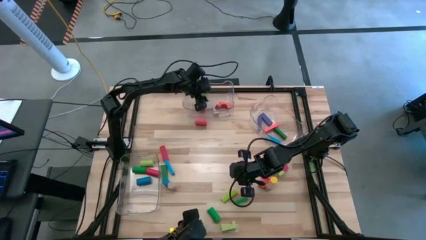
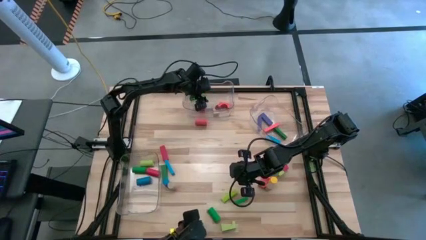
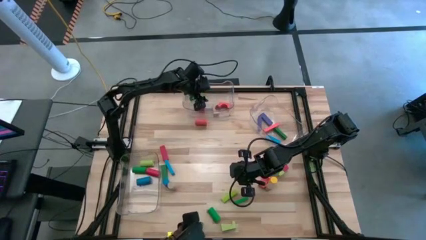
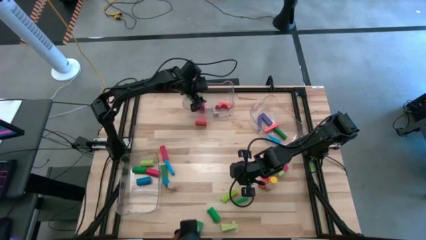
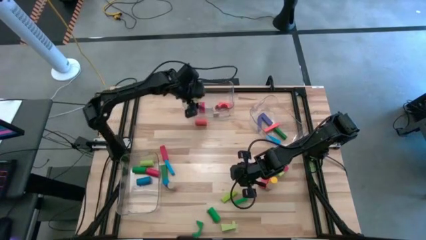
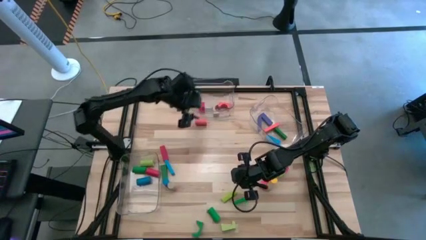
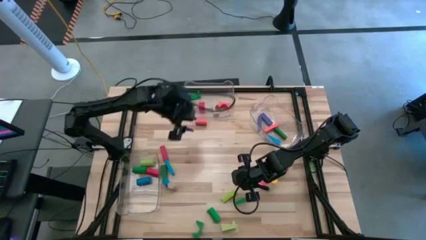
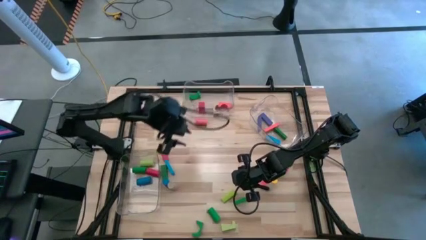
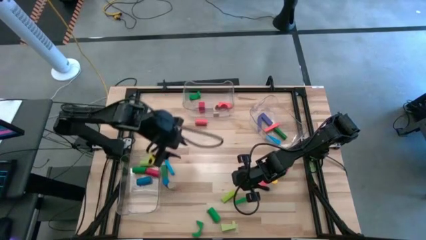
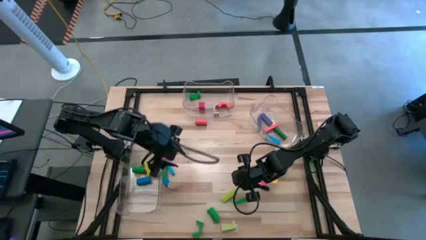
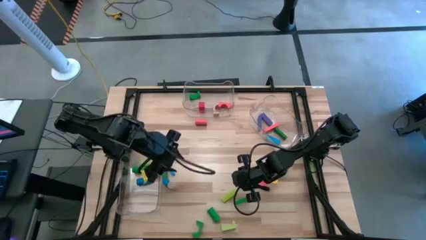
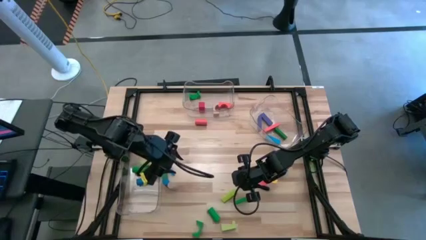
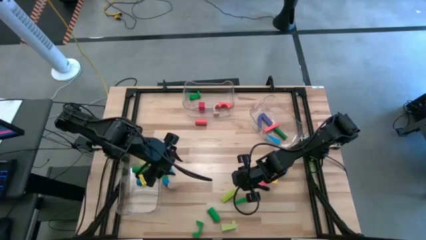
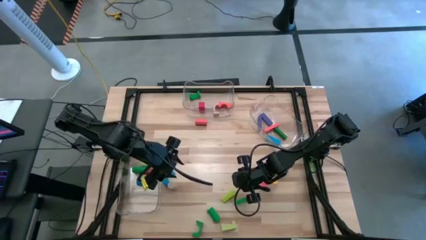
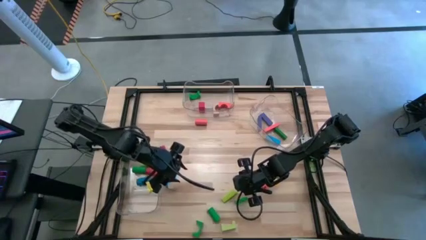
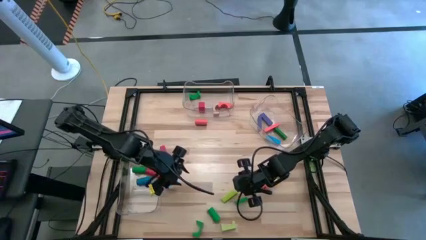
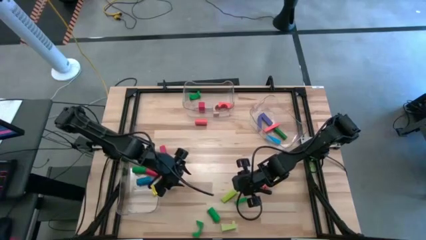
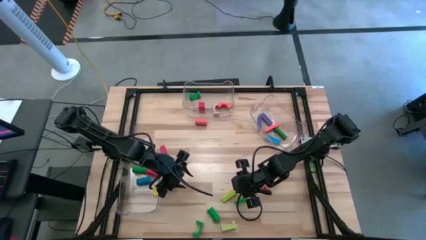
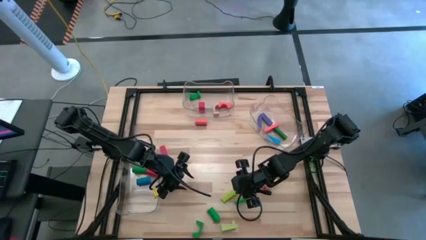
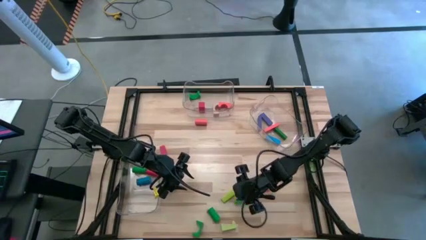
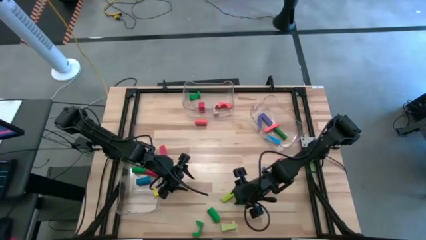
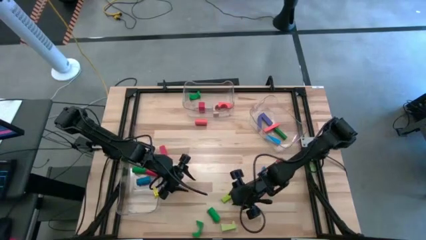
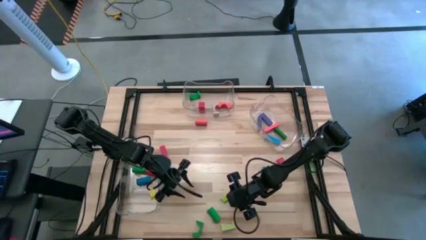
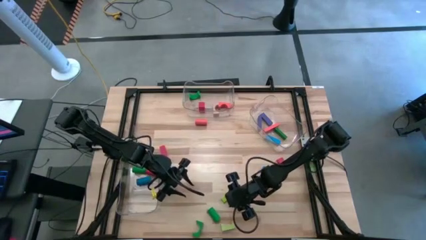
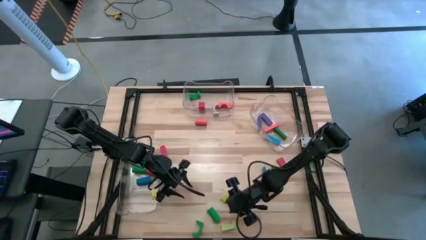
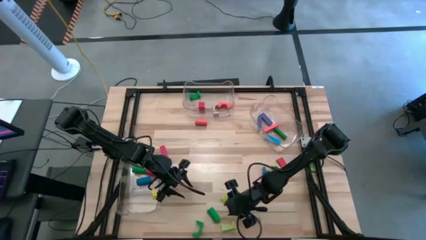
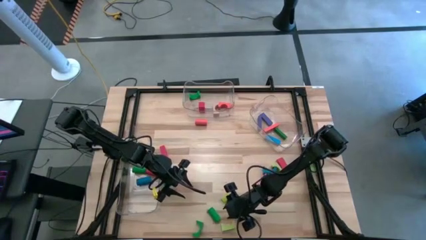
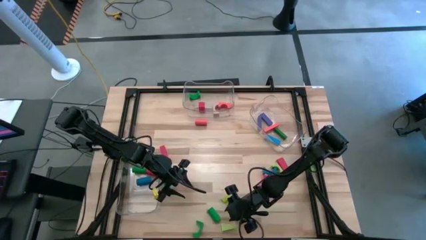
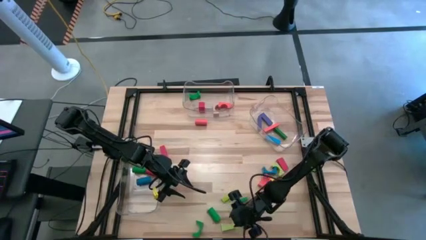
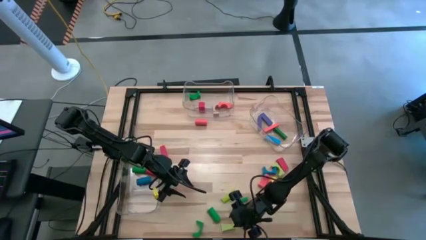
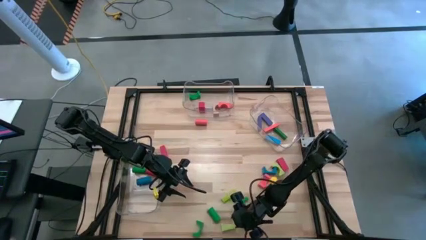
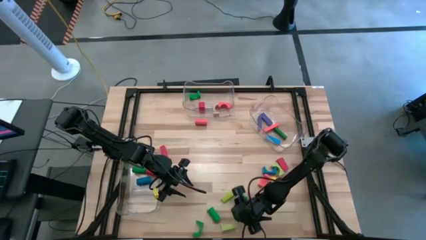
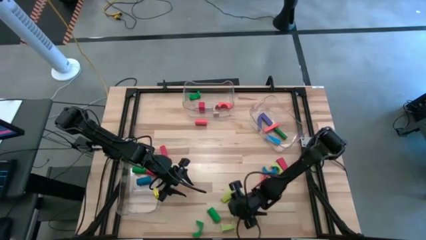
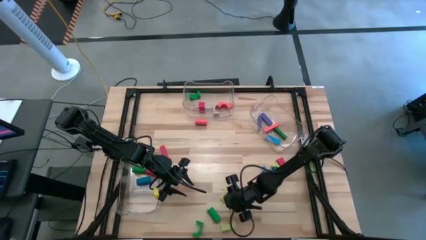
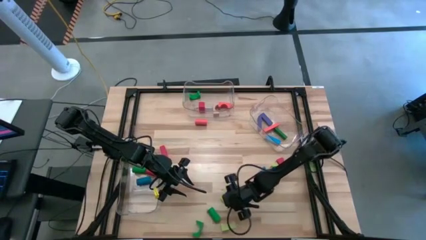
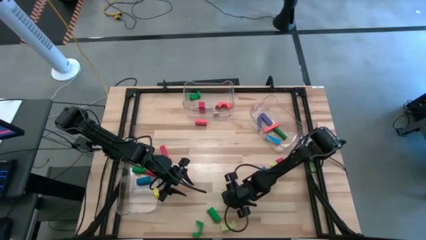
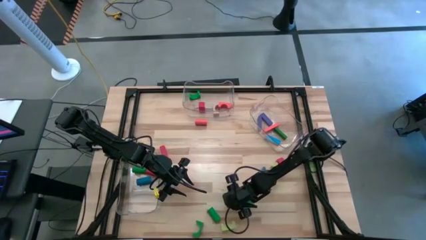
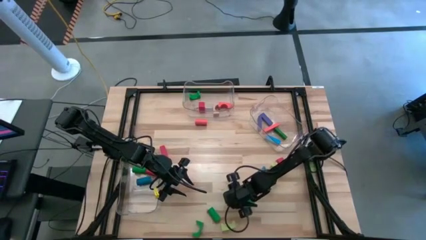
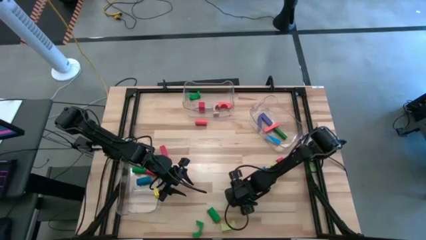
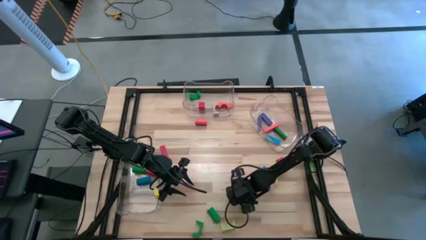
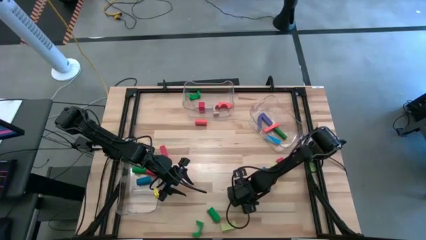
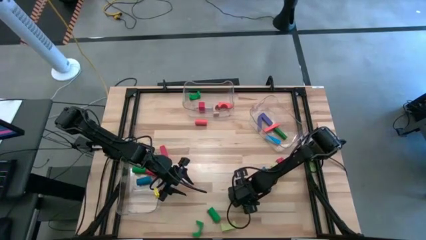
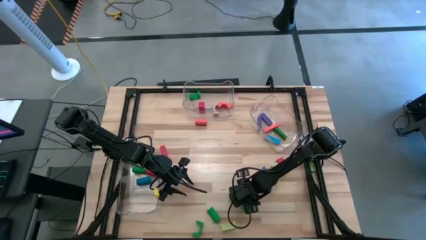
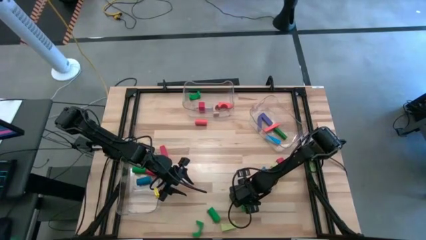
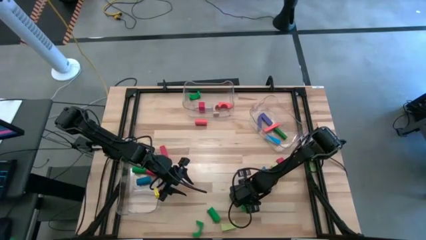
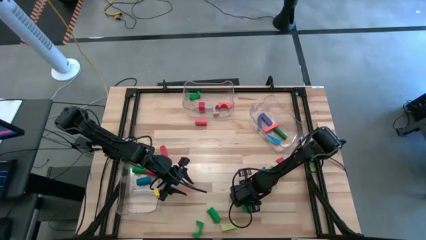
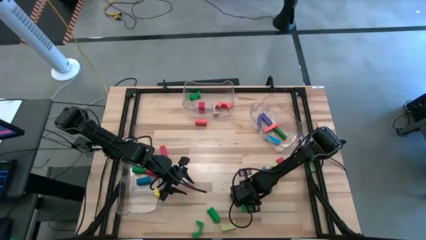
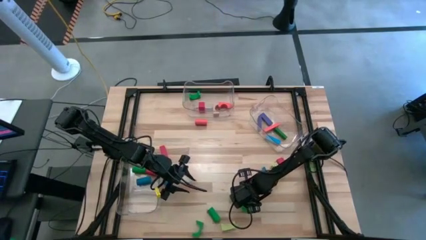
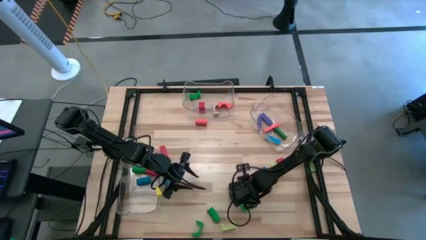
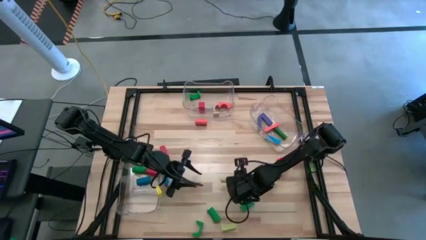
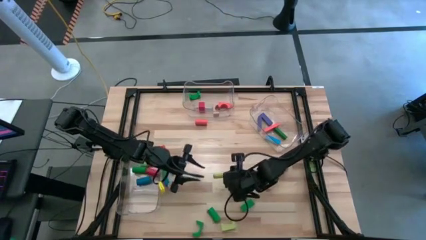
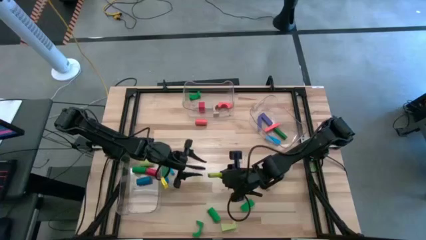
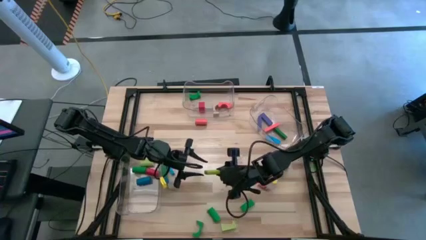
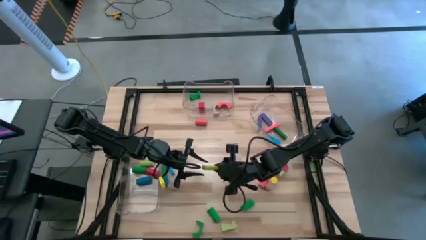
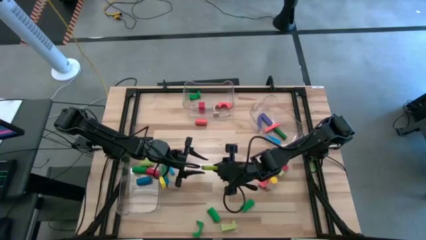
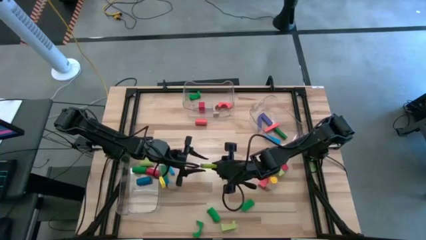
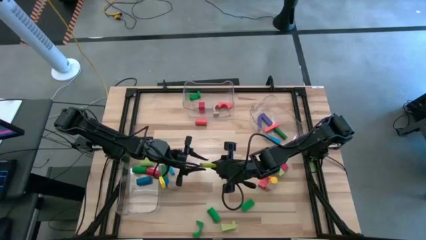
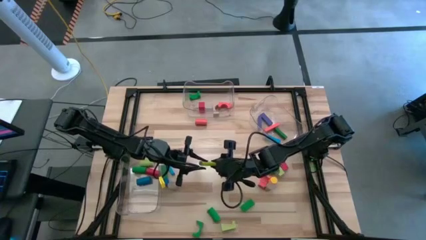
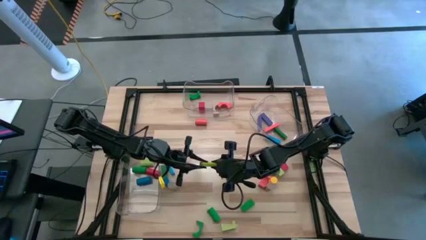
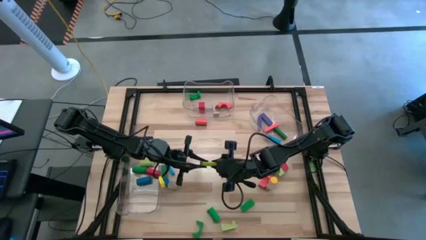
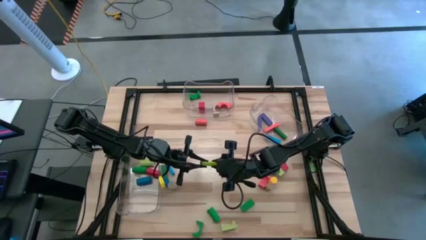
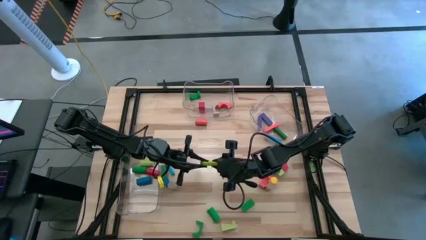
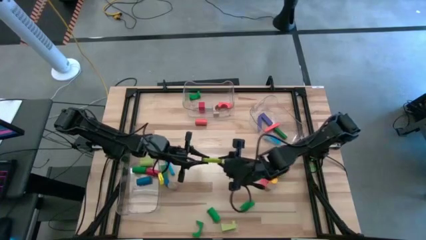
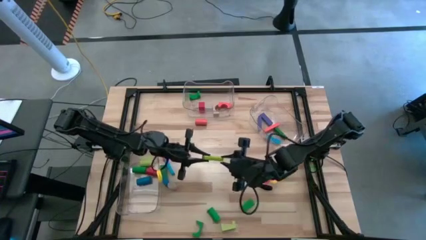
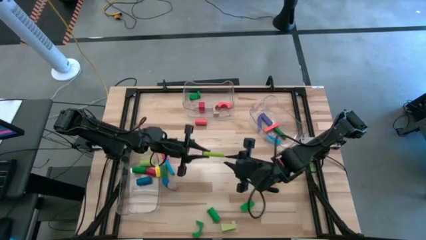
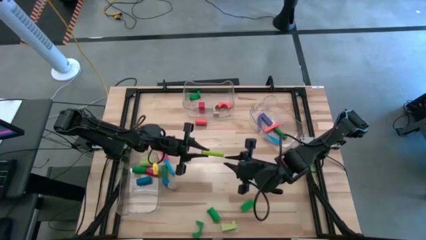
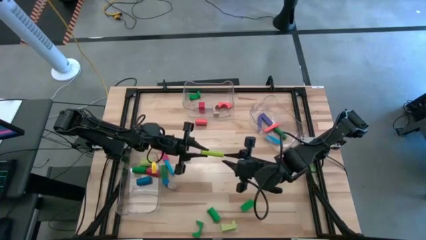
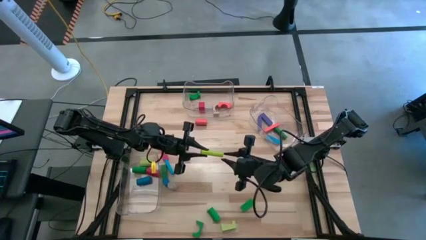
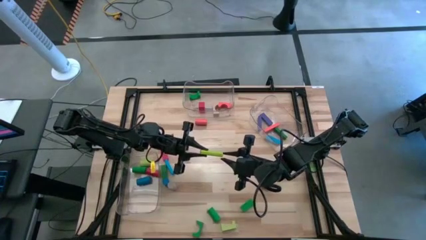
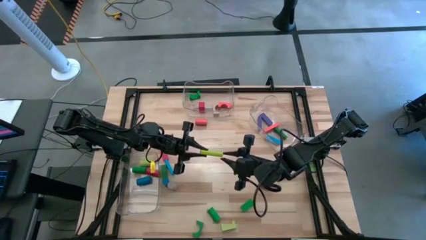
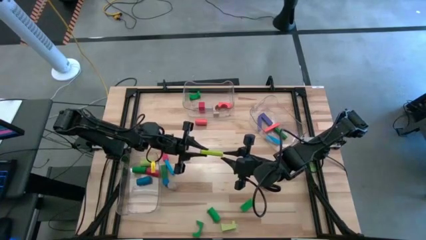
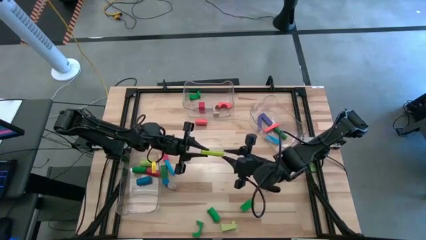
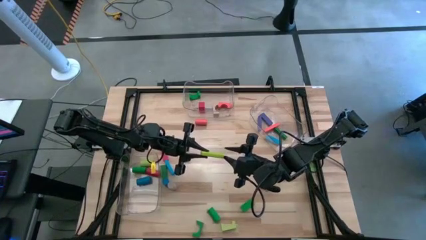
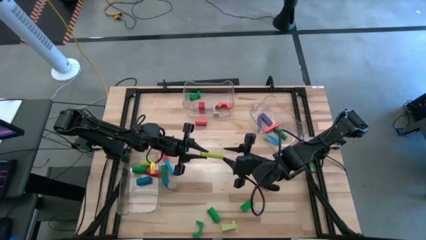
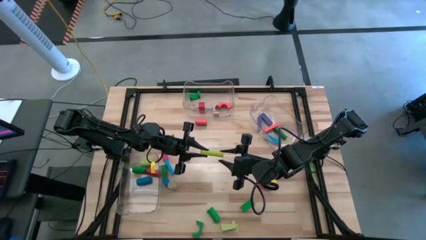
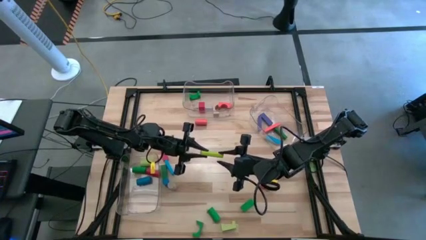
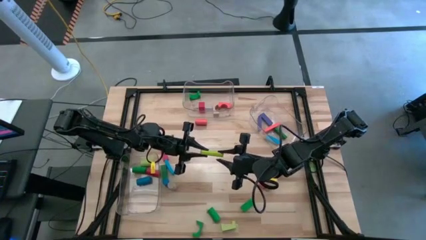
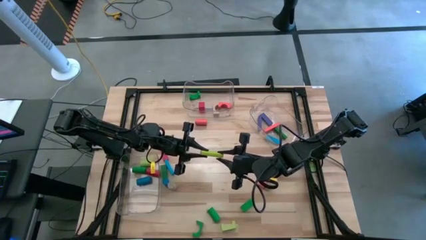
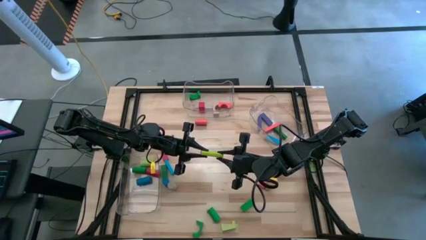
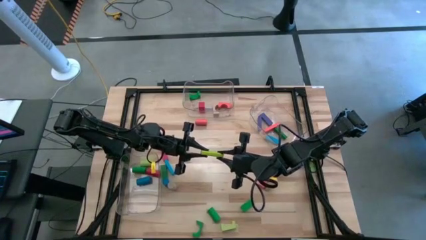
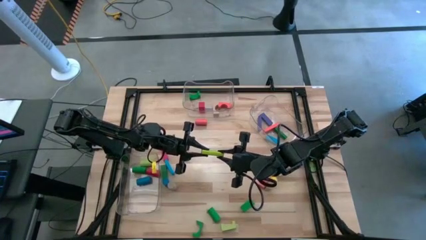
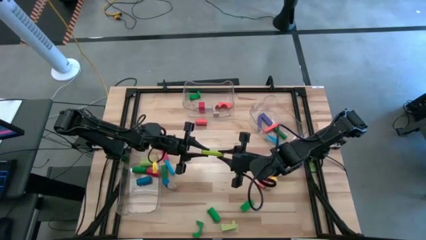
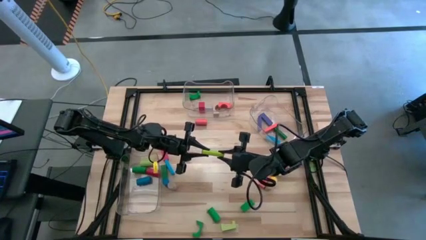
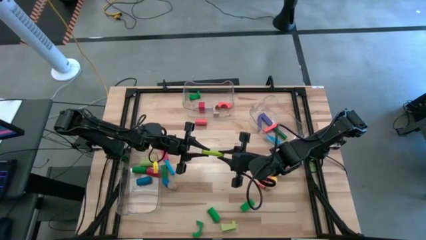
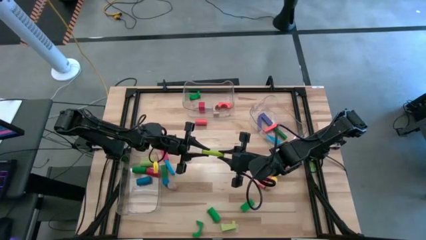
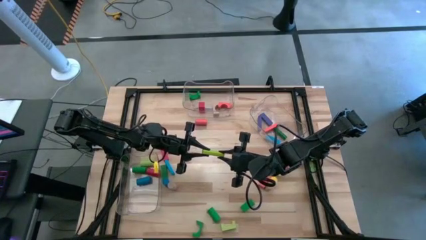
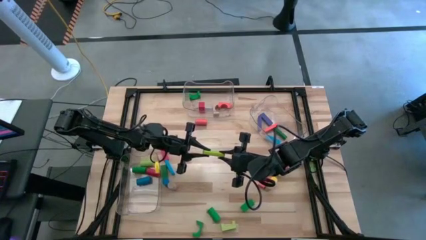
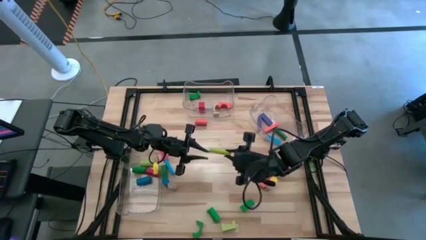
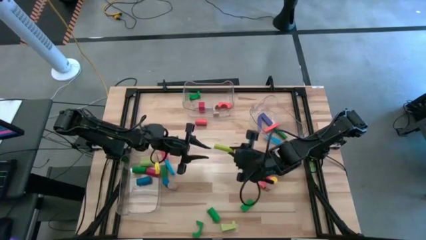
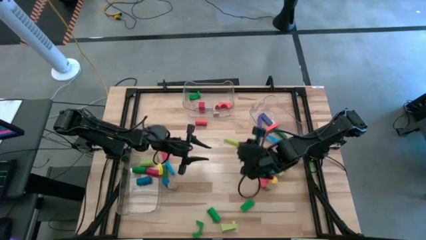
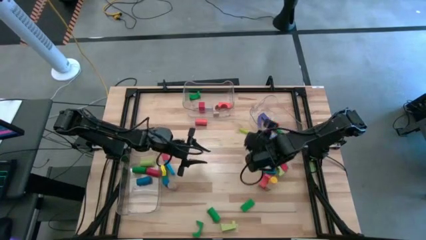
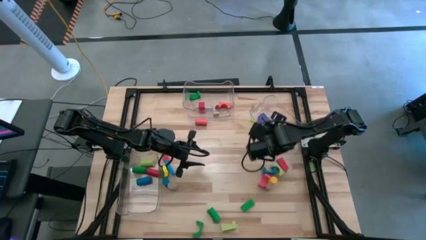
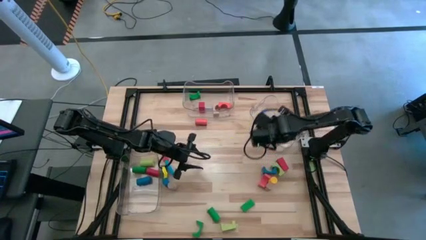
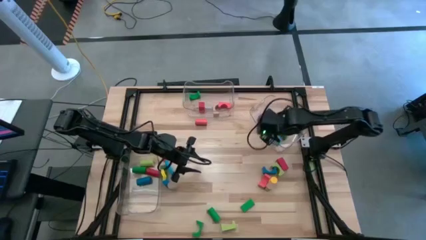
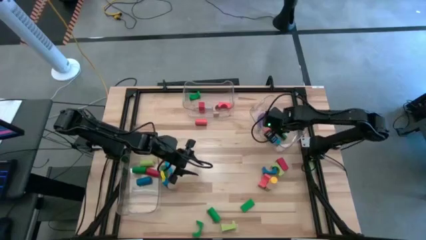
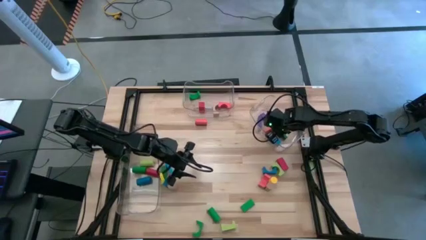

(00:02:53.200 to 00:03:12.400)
Task: Sort blocks by size
Put the light green rectangular block into the right transparent bin
